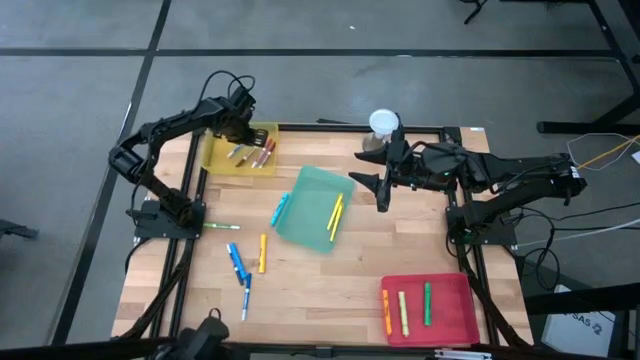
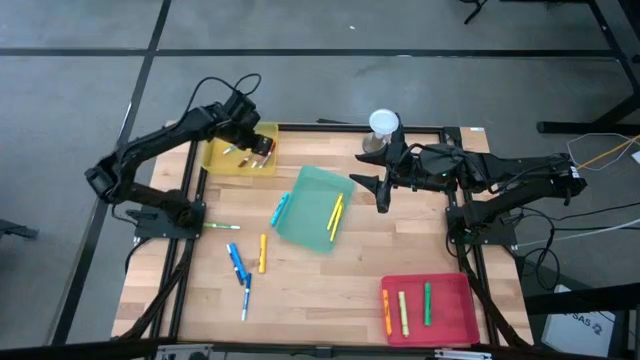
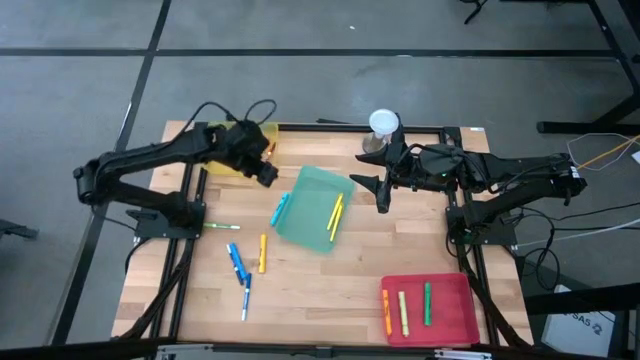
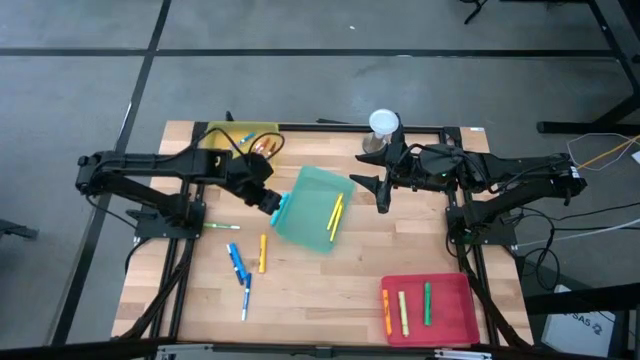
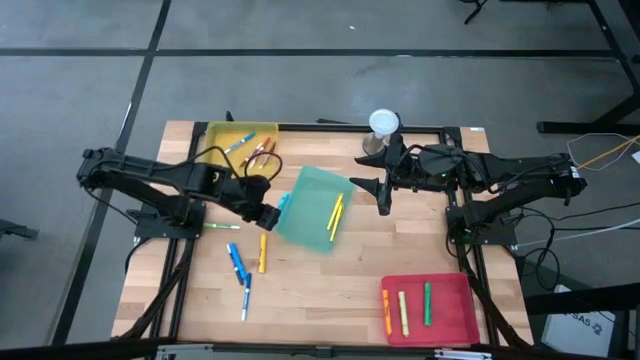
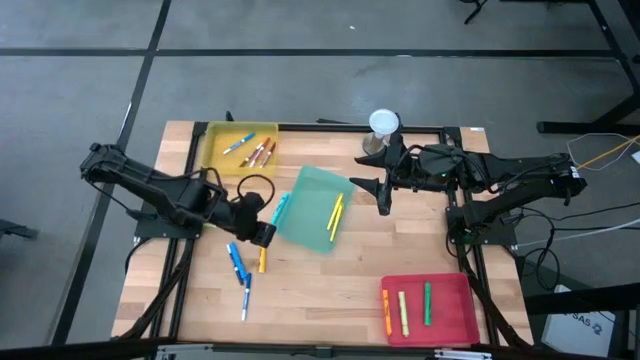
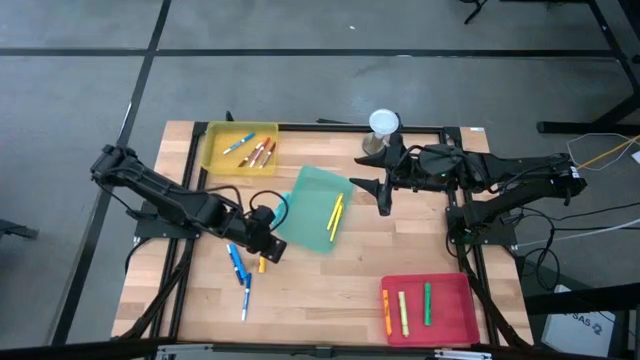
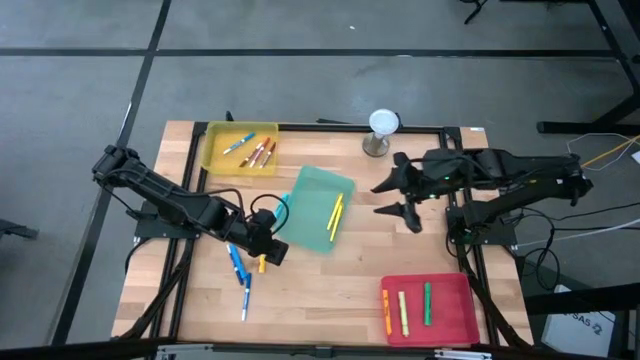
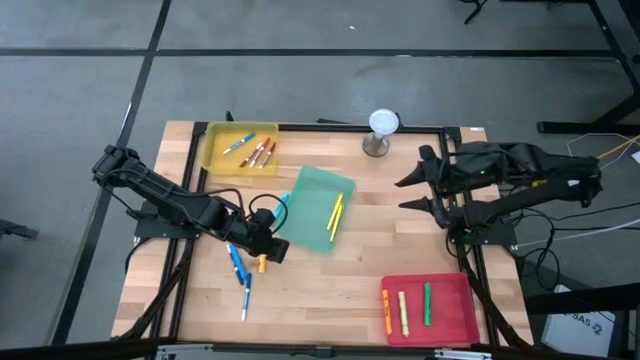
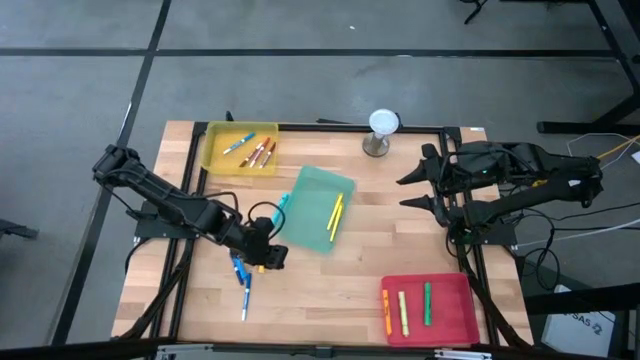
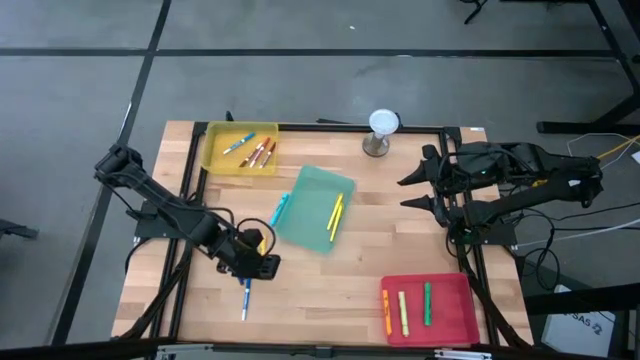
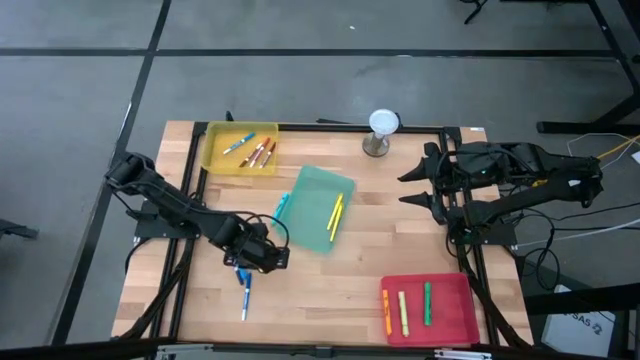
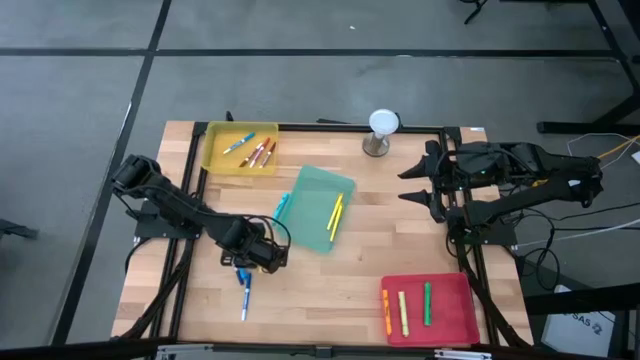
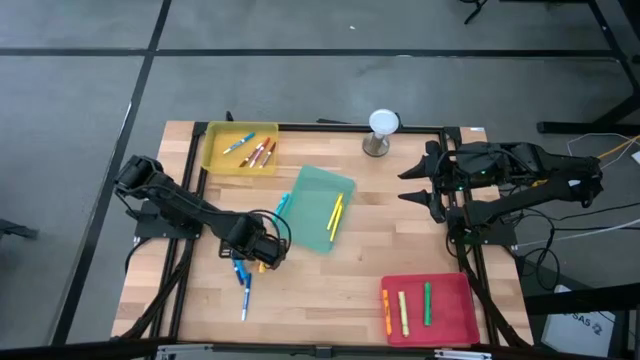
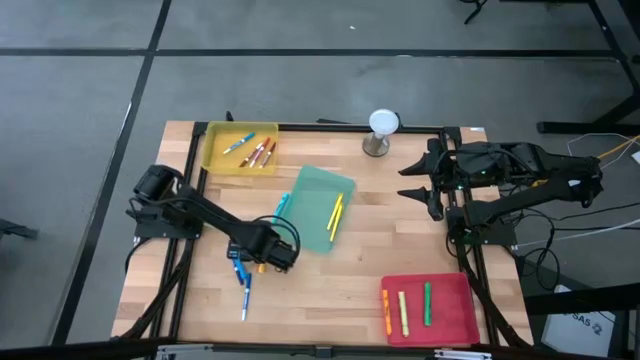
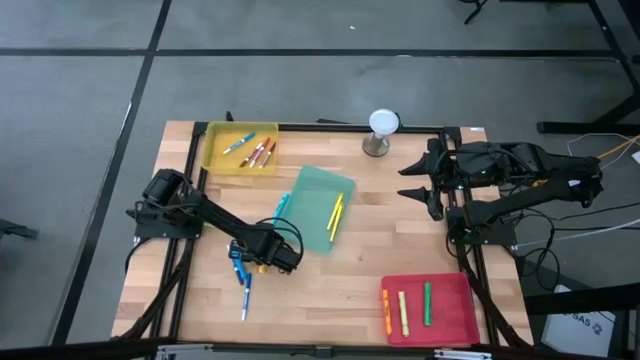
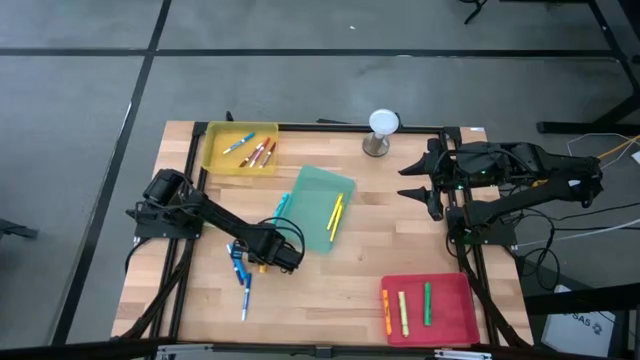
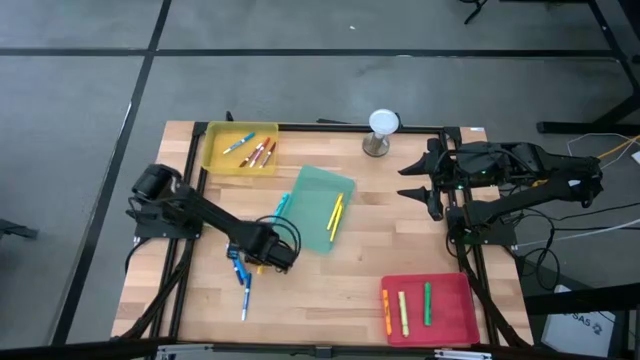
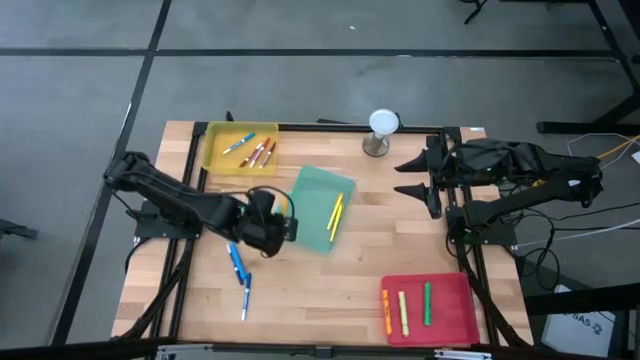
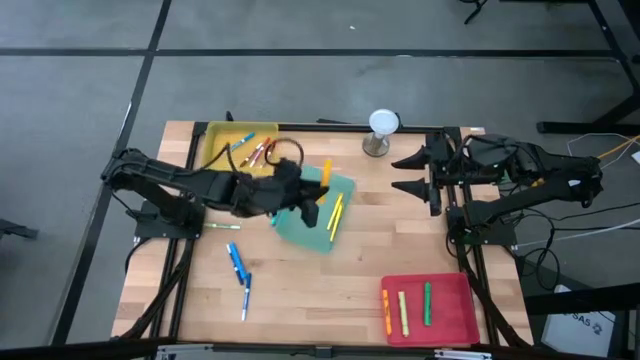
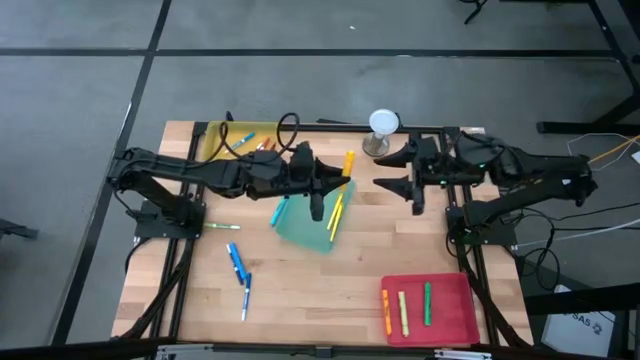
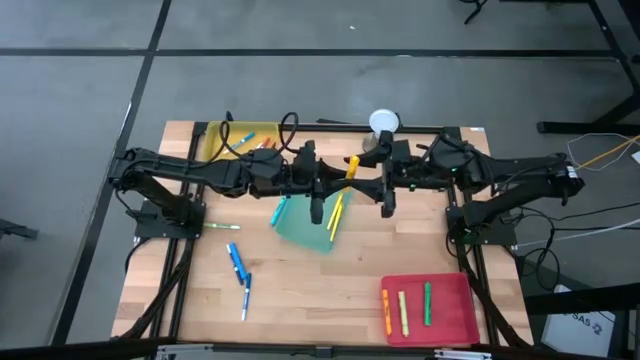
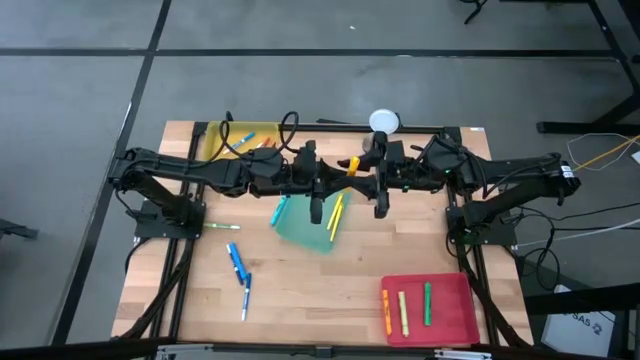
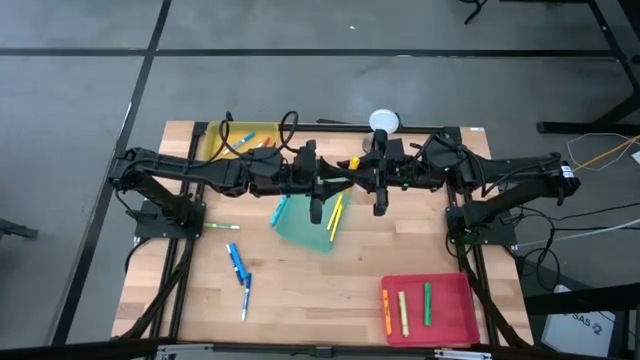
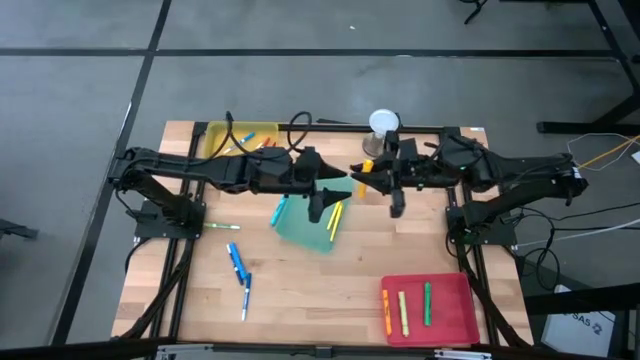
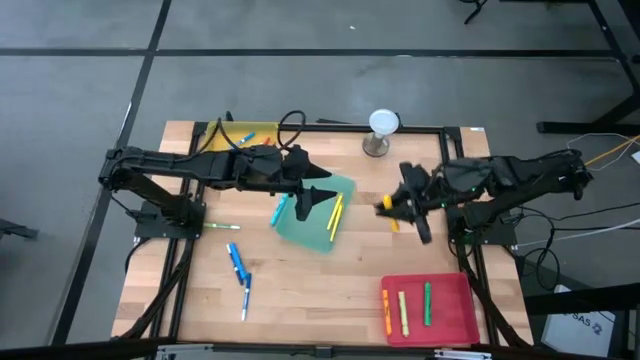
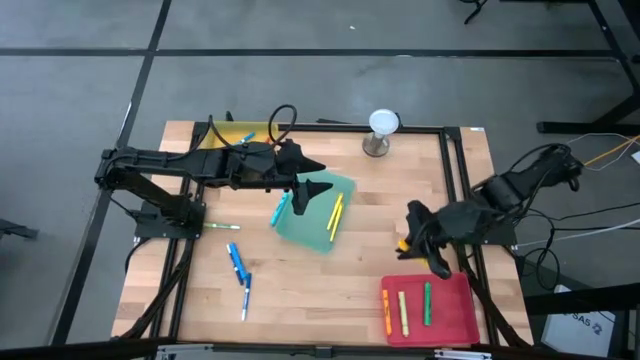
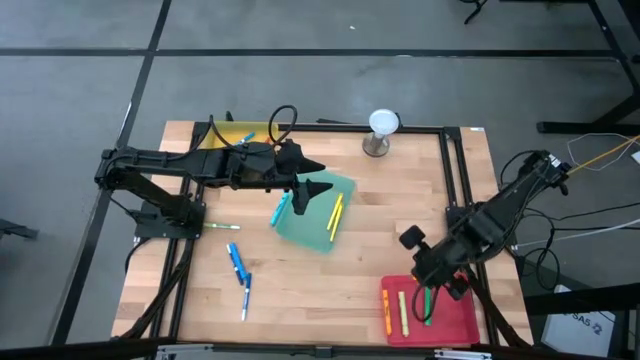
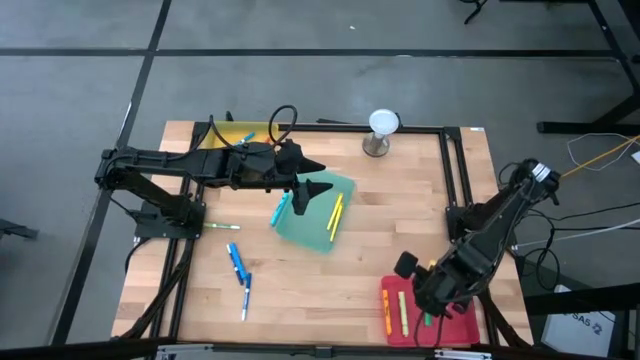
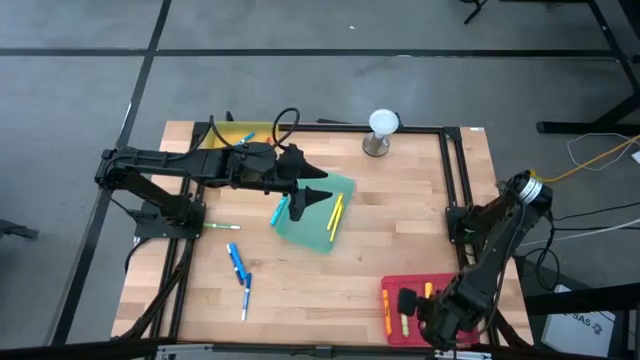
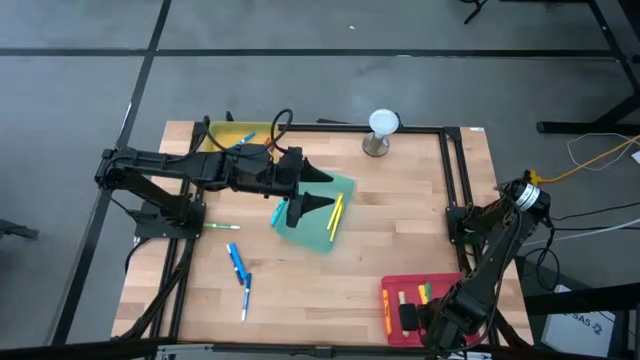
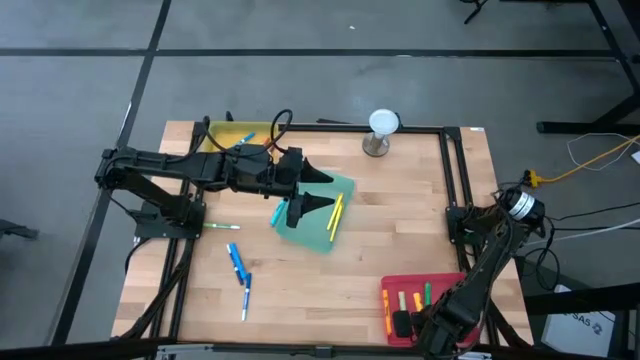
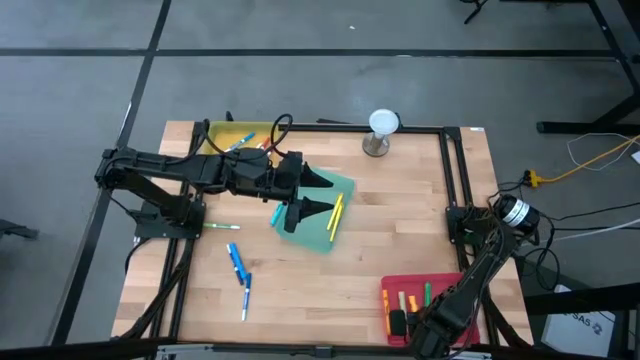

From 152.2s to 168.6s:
Task: Pick & Place Markers
Put the yellow highlighter pen into the pink bin

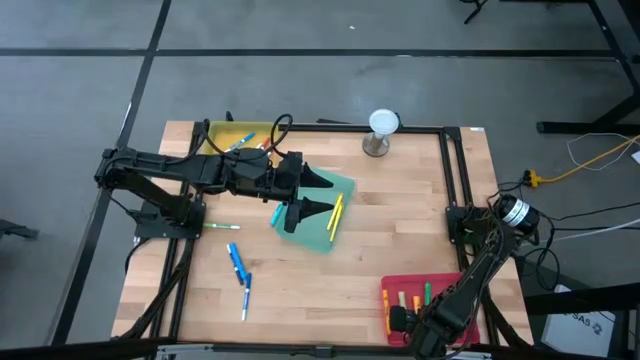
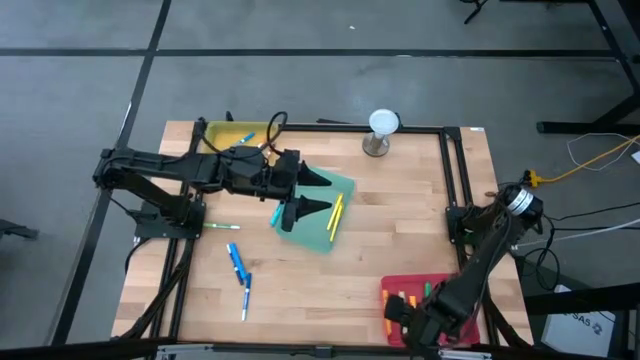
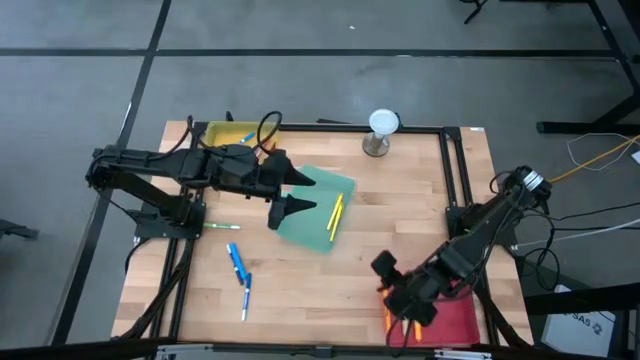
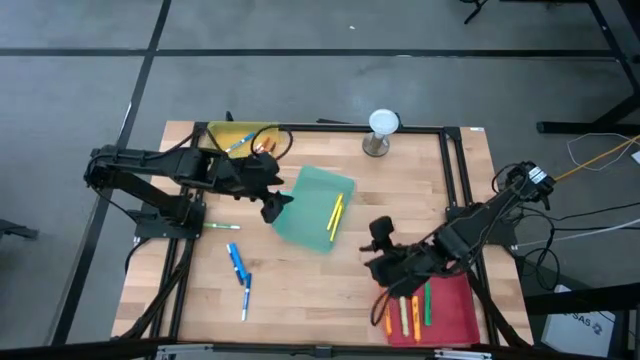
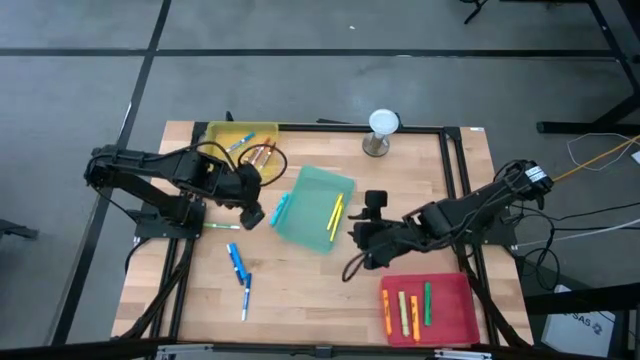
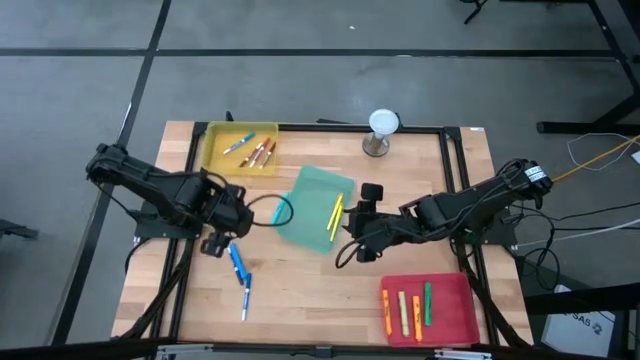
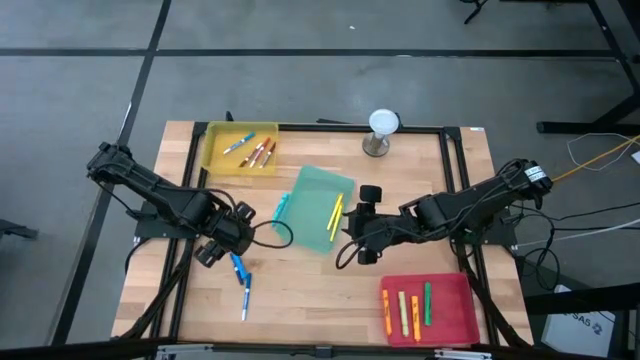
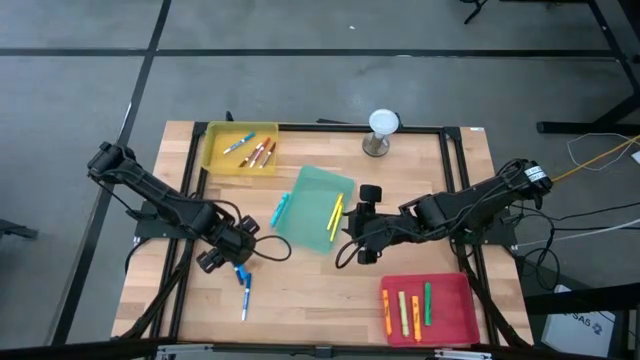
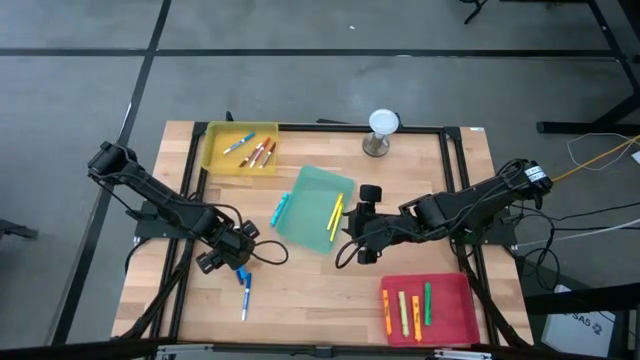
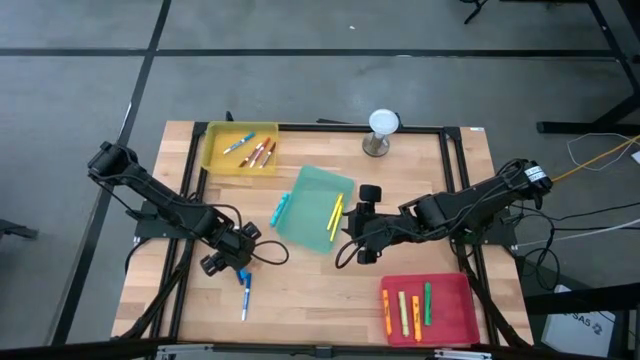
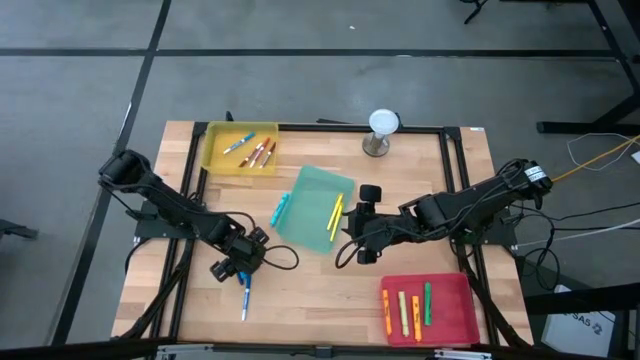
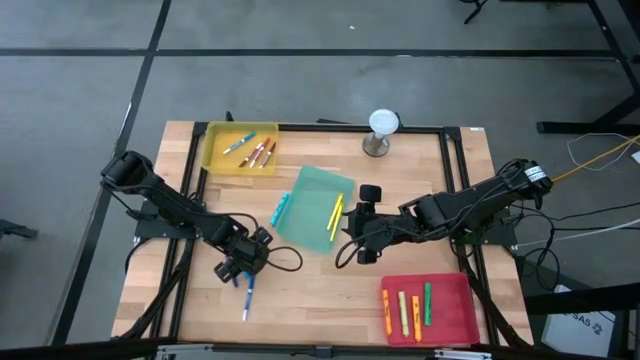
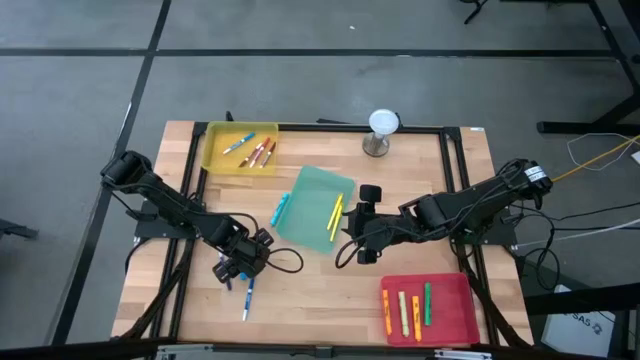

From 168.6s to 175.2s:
Put the blue highlighter pen into the pink bin
